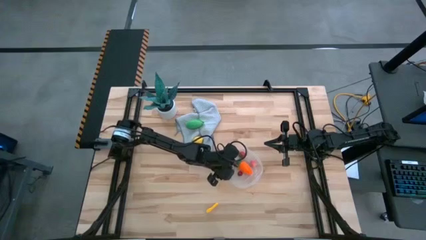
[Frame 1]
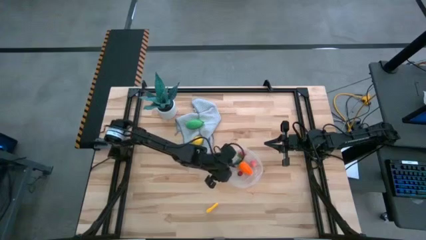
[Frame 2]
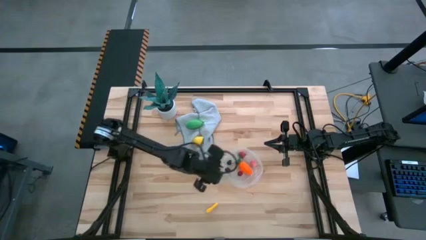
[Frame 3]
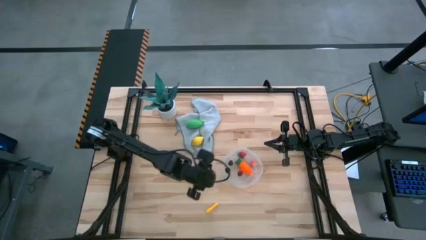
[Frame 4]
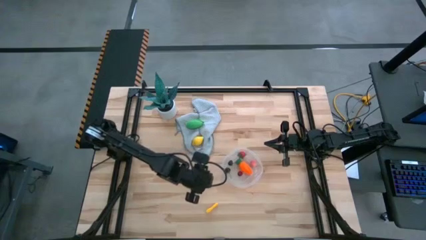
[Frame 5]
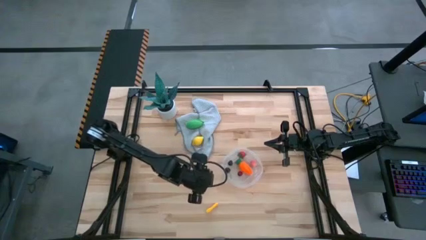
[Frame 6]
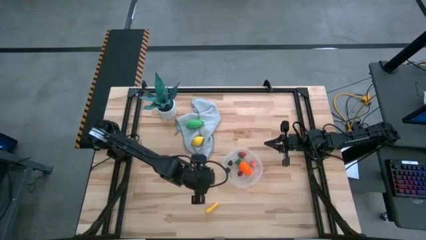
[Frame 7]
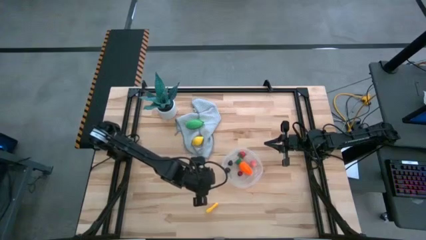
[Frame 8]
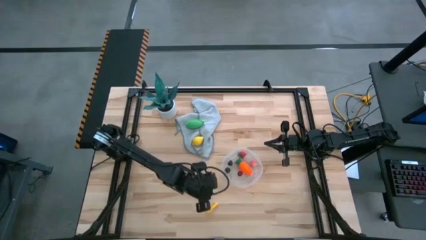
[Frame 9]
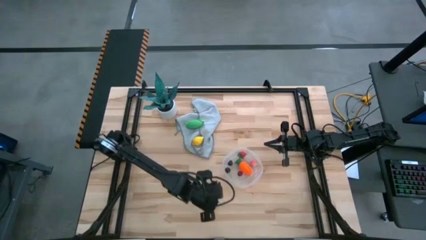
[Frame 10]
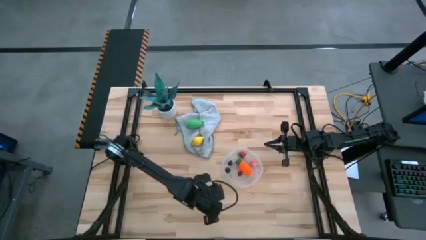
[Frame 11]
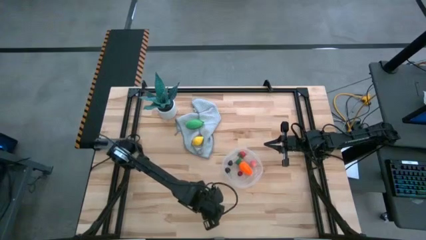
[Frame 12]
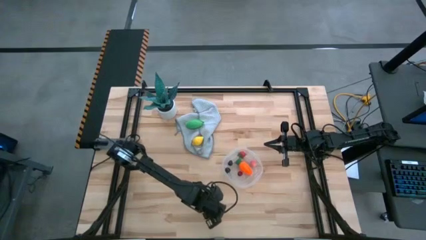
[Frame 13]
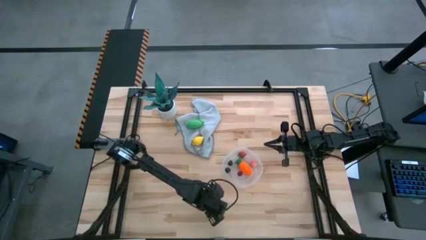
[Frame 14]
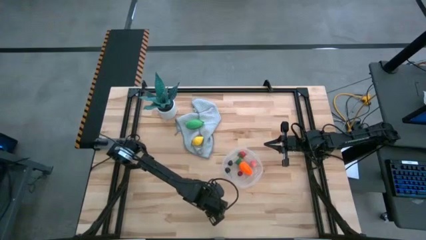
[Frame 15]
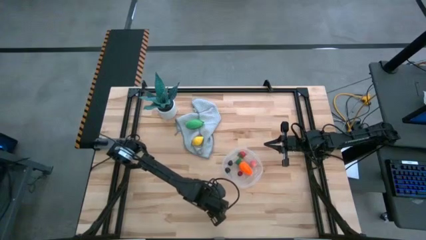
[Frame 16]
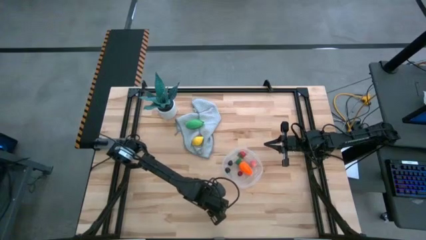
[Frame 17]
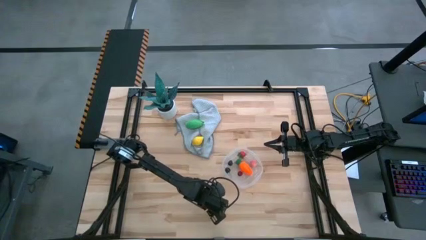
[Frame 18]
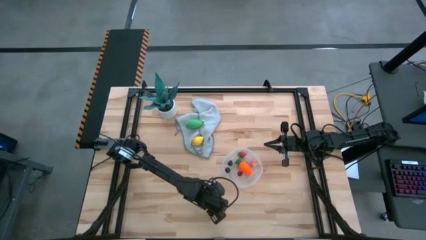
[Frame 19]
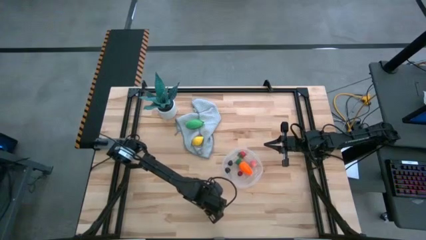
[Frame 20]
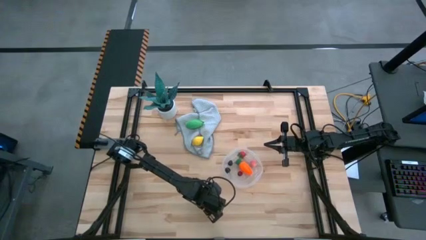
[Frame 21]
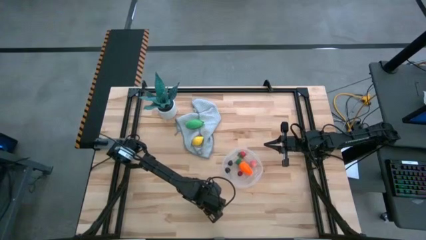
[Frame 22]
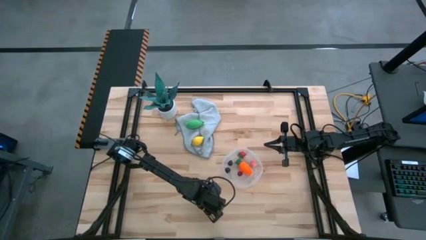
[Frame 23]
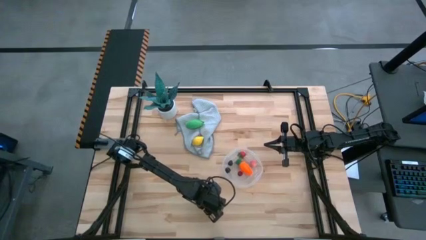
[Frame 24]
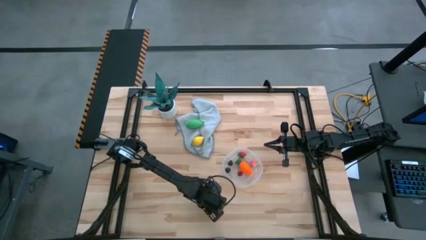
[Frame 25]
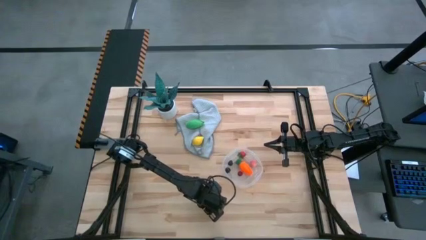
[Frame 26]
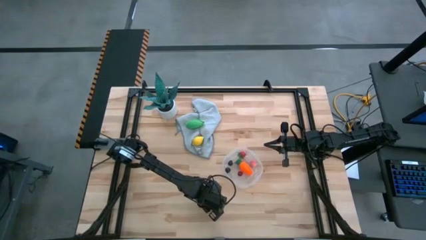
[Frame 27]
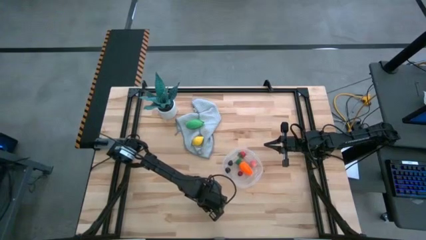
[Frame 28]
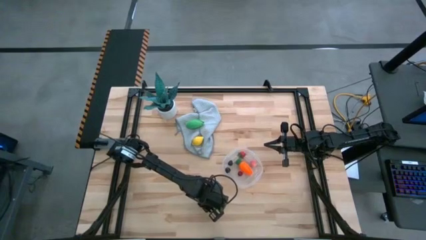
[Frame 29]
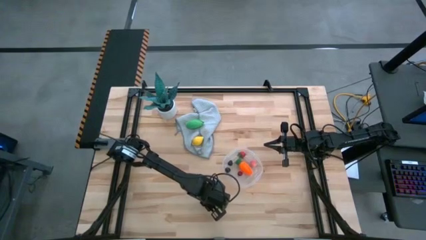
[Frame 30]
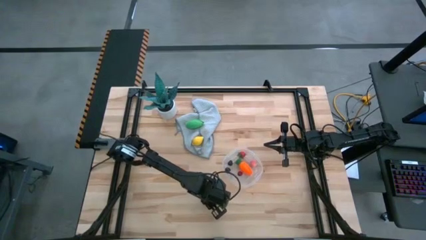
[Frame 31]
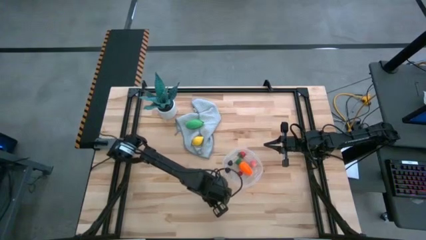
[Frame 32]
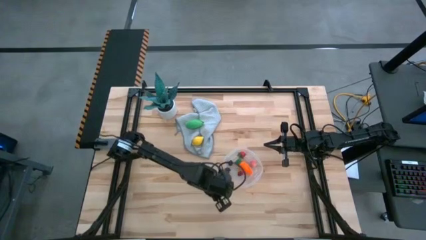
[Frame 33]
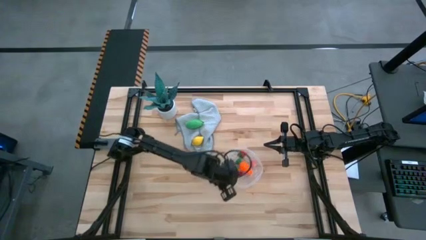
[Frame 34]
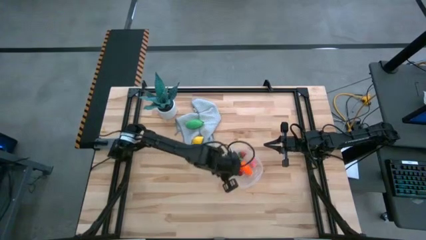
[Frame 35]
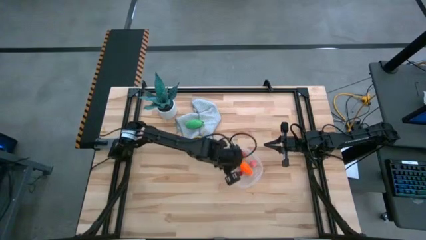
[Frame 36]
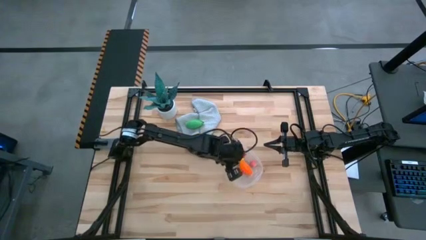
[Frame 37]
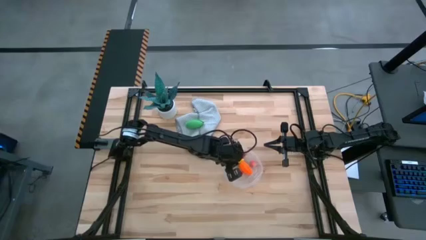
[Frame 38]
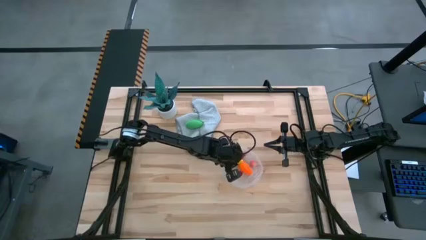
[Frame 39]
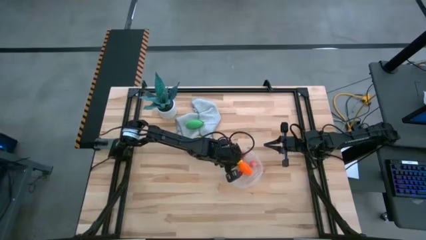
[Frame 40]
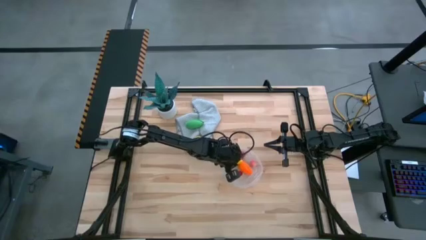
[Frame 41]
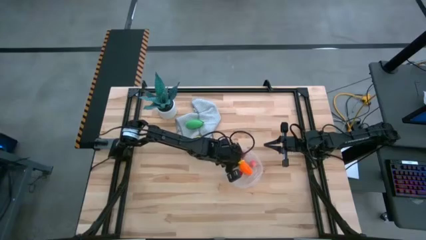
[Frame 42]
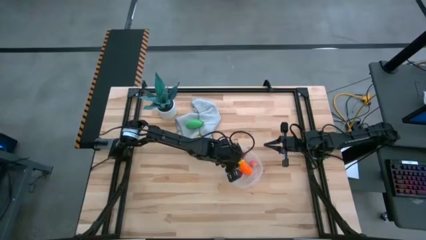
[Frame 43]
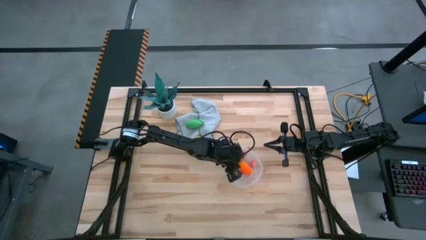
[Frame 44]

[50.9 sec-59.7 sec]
Task: Pick and placing Produce into tupperware
Put the yellow chili pepper into the transparent bin

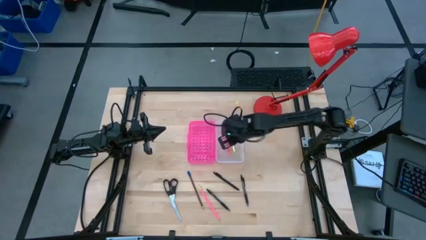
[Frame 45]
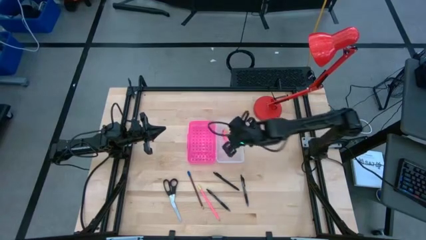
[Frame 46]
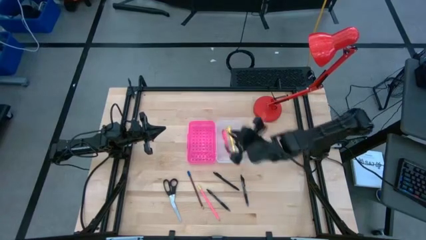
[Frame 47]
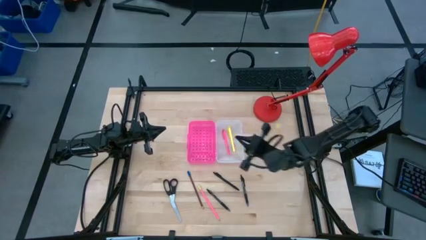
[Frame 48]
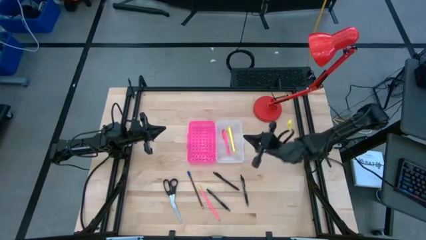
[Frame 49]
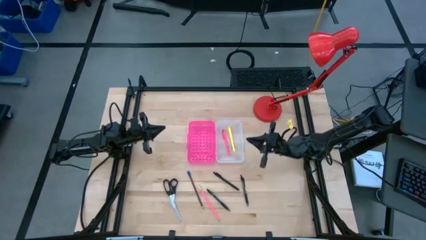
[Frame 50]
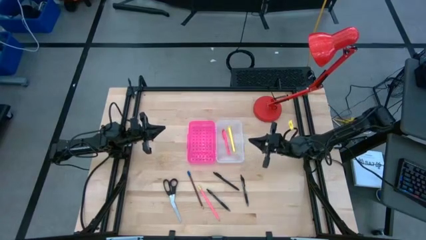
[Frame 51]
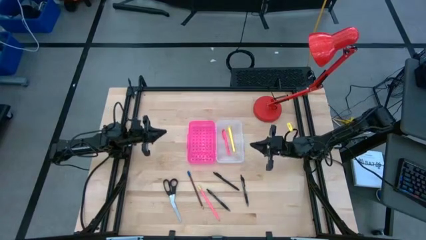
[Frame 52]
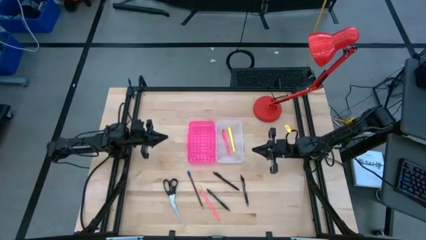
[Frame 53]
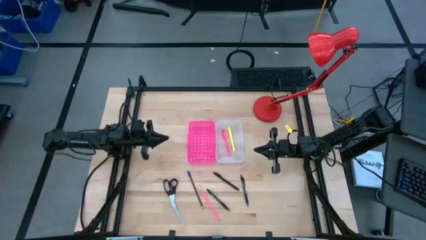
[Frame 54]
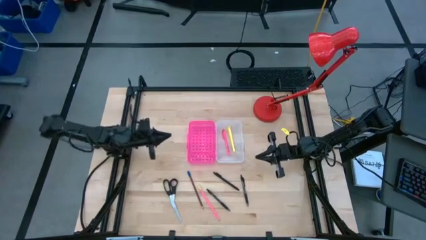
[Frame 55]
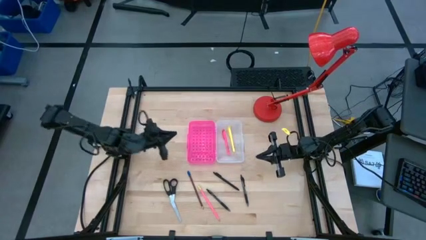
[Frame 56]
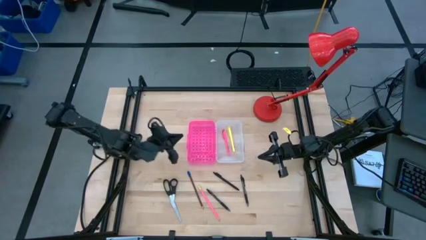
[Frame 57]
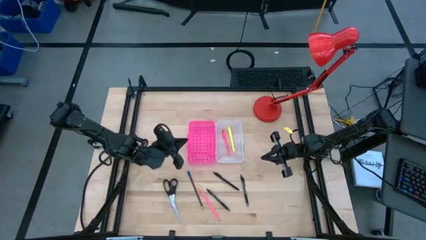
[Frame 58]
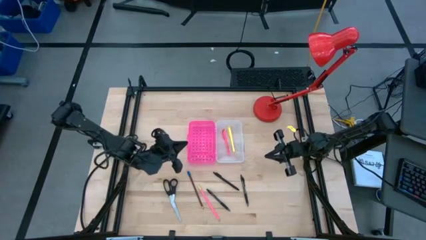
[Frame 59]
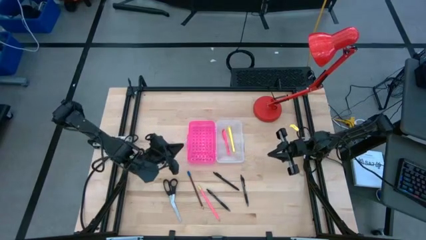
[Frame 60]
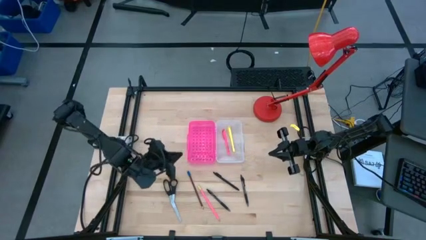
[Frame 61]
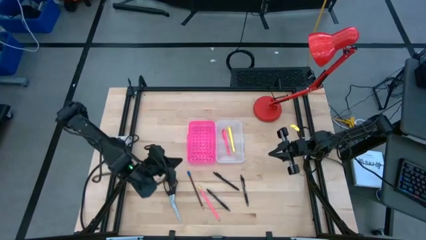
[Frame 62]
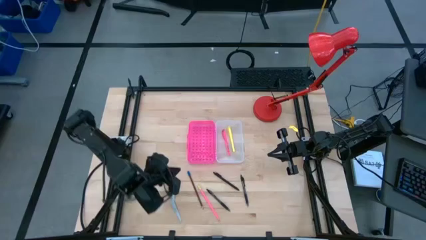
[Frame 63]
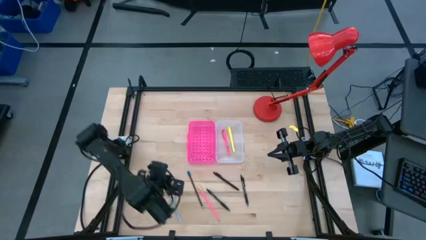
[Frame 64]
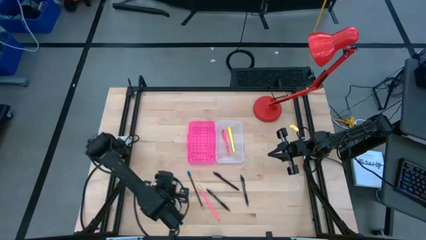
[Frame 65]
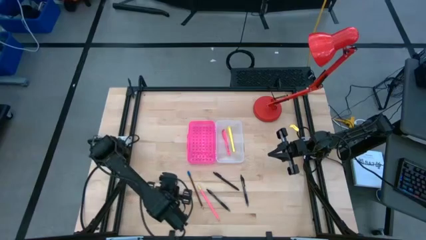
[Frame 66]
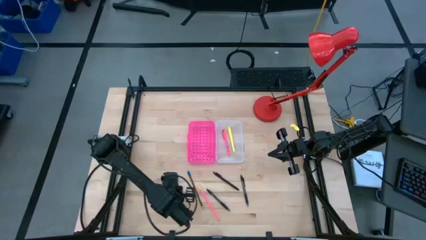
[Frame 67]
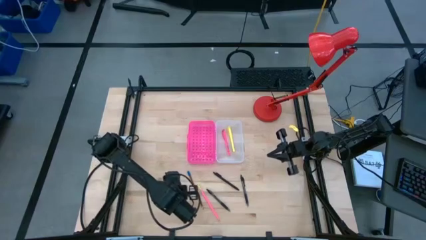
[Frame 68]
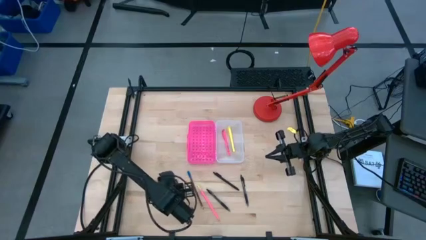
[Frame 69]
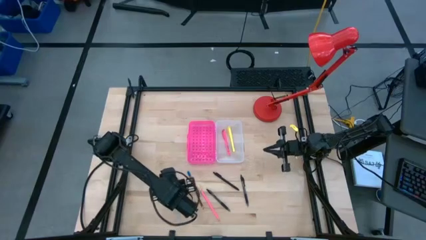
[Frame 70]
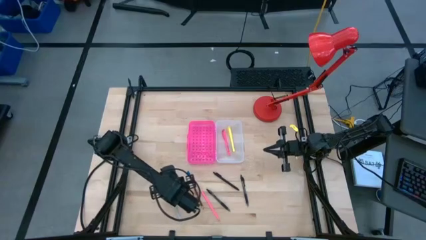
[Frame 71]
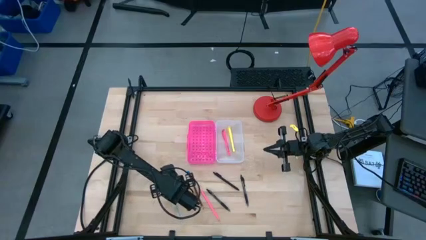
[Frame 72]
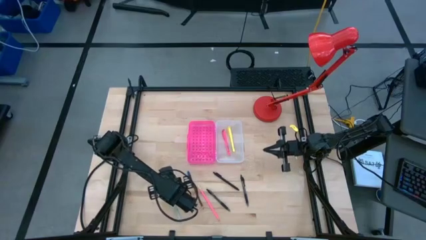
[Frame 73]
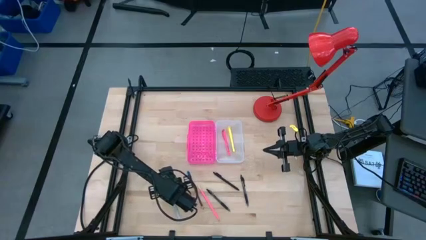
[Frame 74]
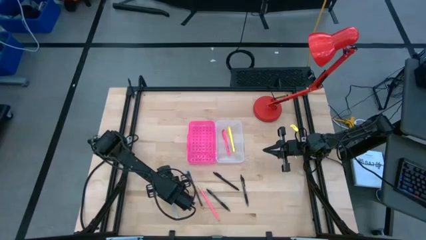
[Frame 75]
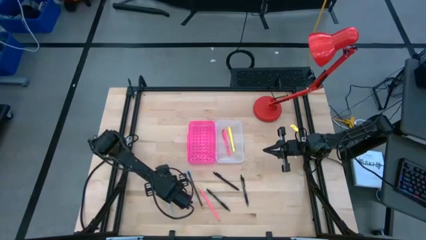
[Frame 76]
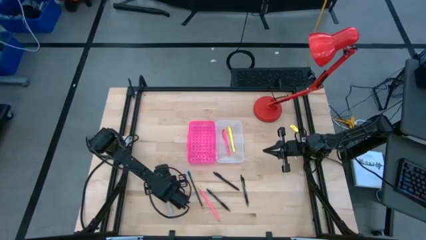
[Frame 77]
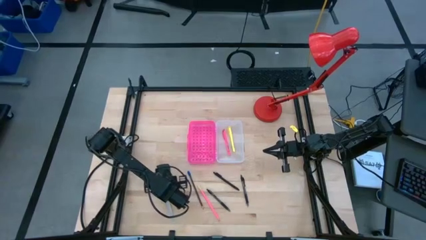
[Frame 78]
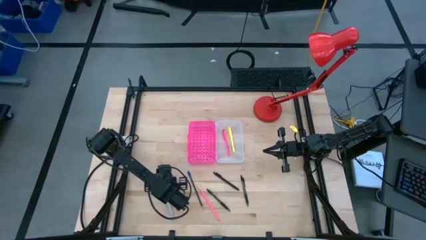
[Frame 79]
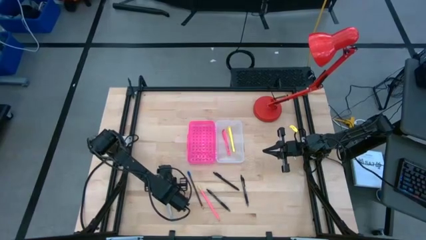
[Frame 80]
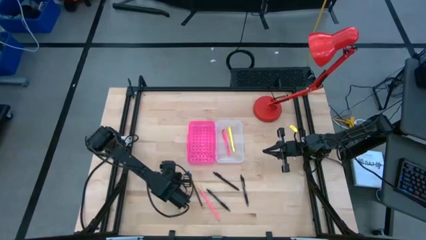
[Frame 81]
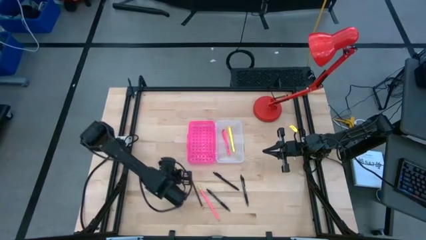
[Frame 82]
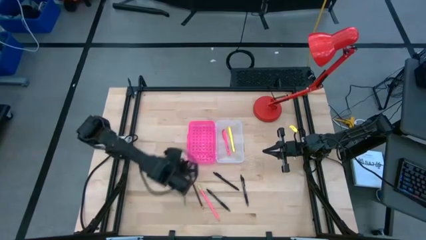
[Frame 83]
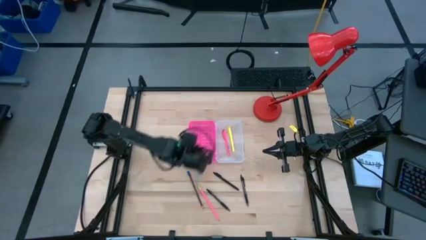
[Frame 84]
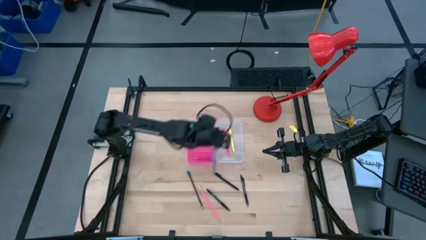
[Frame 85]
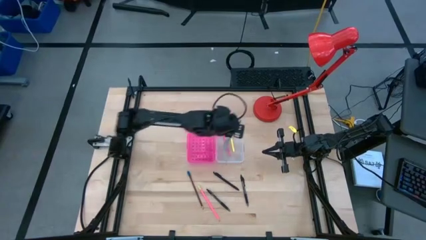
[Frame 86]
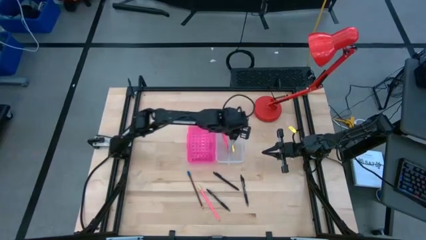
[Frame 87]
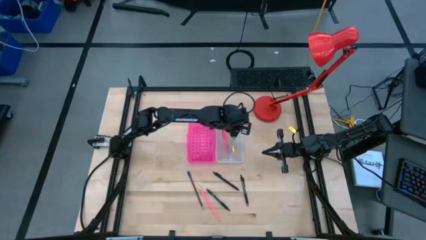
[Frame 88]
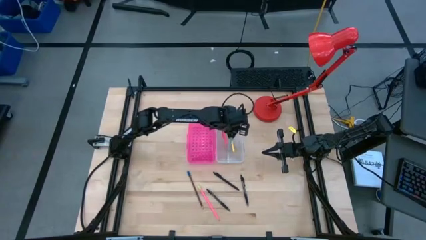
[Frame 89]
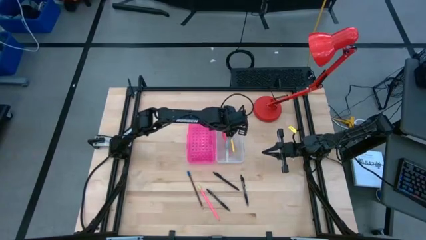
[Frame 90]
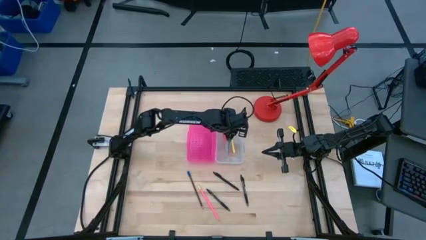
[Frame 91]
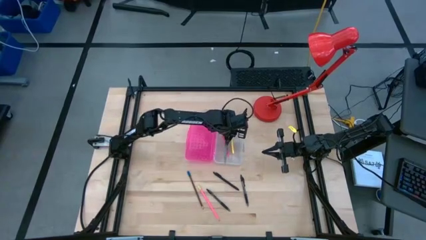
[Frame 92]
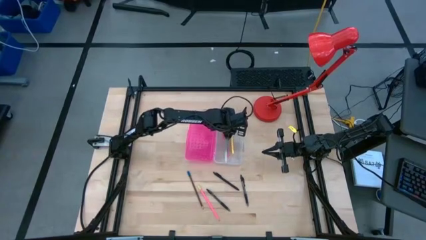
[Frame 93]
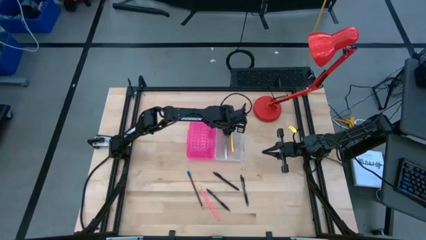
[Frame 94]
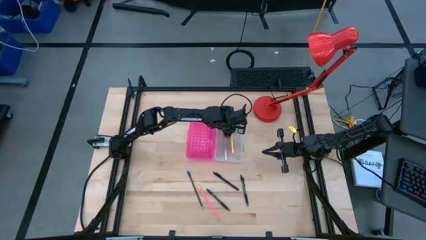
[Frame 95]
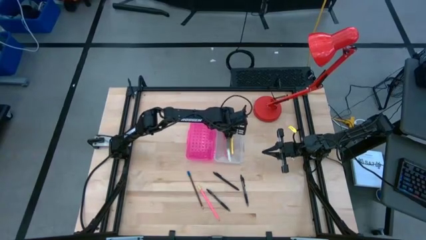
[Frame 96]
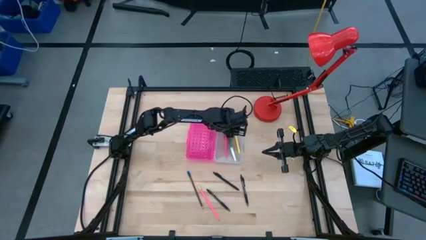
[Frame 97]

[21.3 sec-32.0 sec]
Task: Pick & place school supplies into a supply box
Put the black scissors into the supply box
